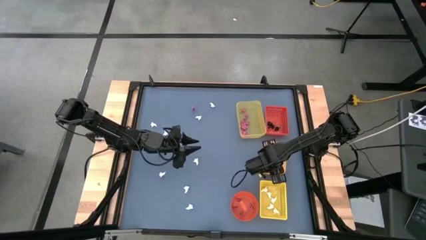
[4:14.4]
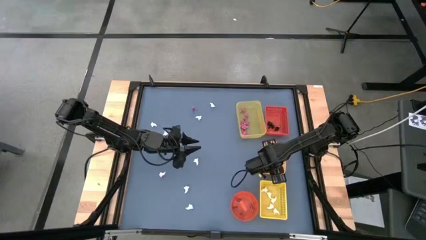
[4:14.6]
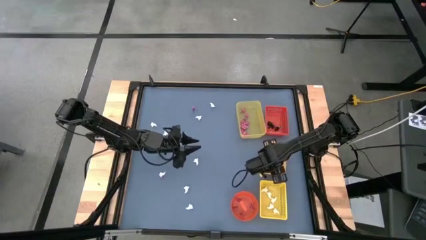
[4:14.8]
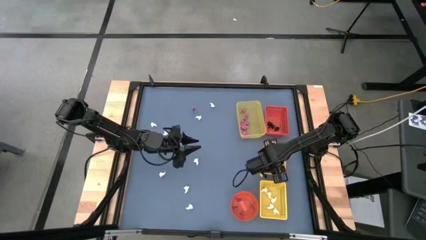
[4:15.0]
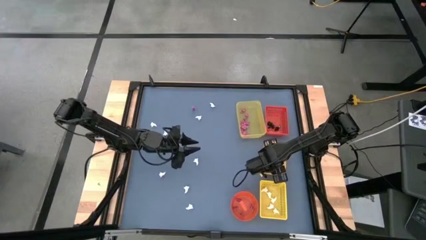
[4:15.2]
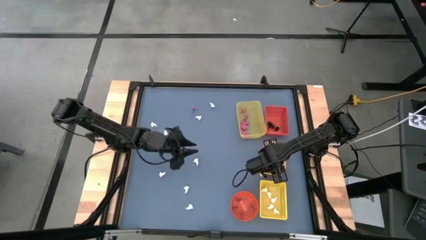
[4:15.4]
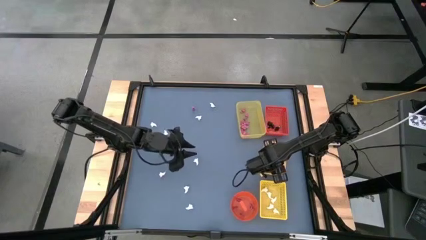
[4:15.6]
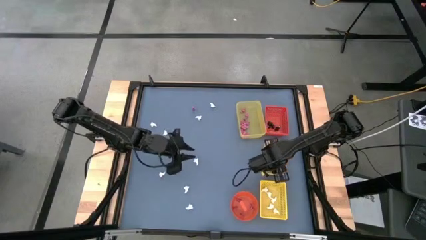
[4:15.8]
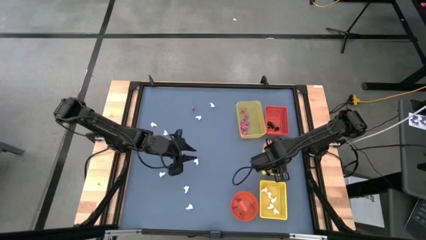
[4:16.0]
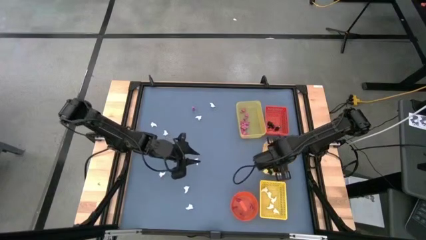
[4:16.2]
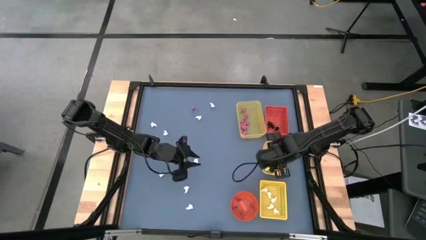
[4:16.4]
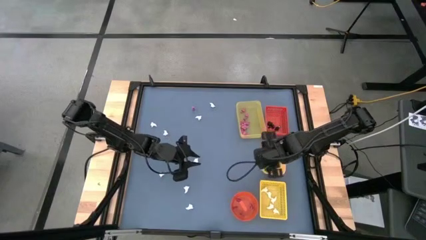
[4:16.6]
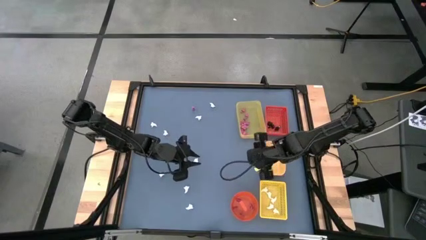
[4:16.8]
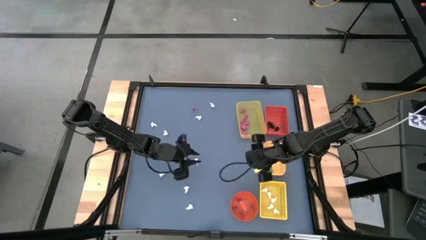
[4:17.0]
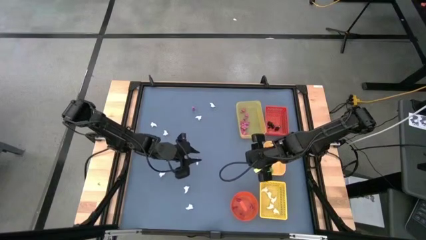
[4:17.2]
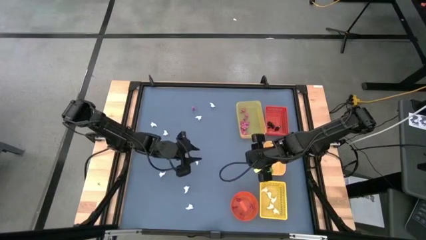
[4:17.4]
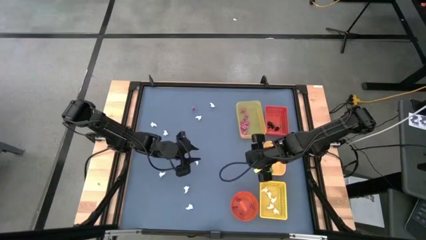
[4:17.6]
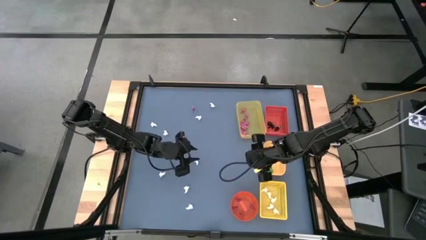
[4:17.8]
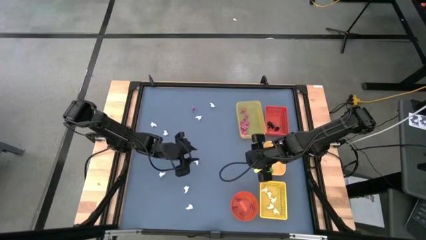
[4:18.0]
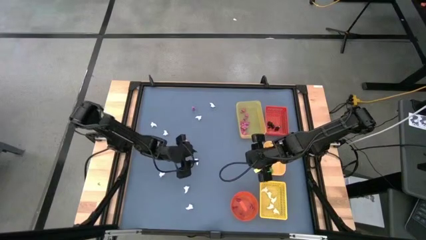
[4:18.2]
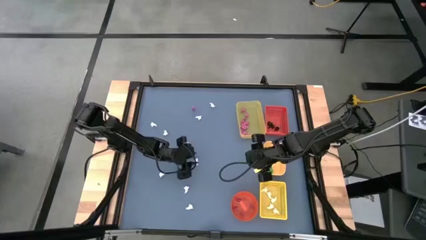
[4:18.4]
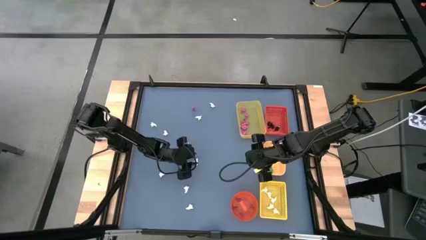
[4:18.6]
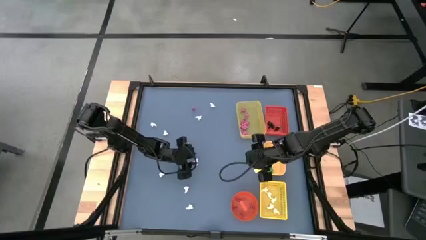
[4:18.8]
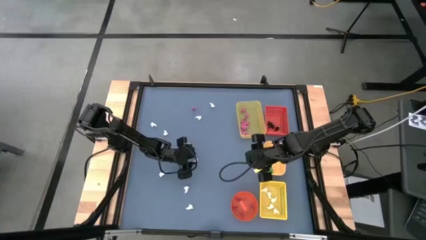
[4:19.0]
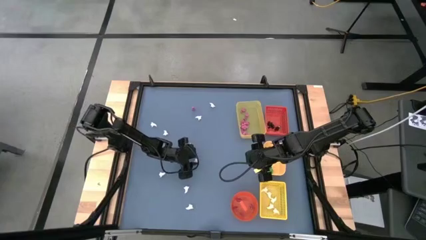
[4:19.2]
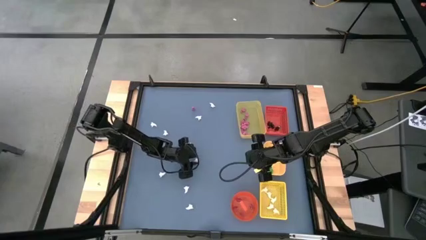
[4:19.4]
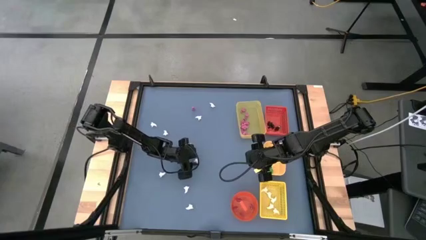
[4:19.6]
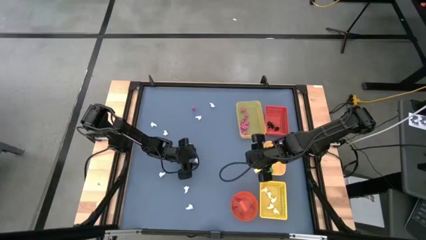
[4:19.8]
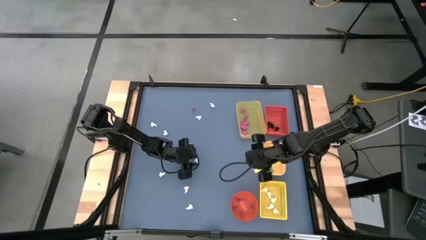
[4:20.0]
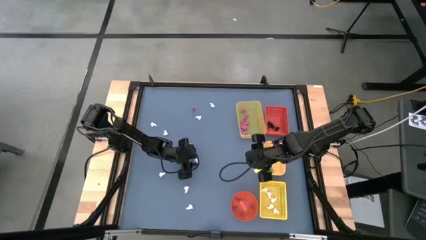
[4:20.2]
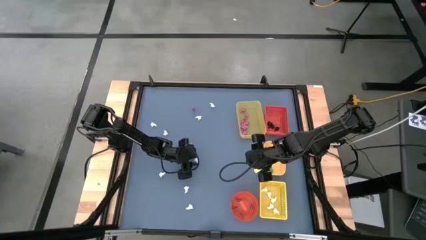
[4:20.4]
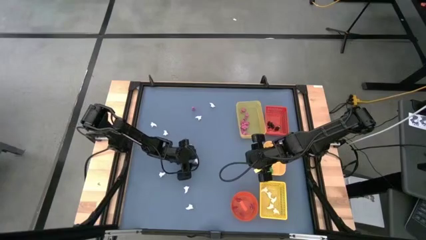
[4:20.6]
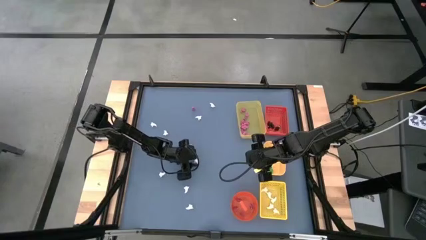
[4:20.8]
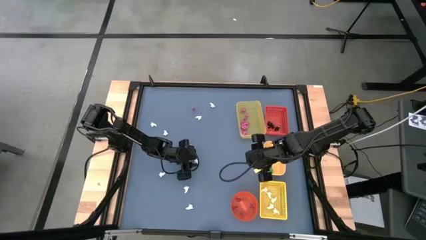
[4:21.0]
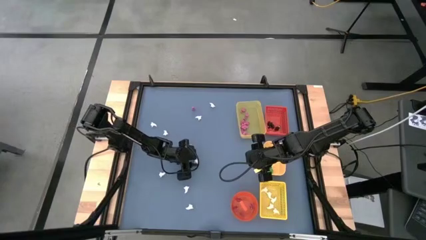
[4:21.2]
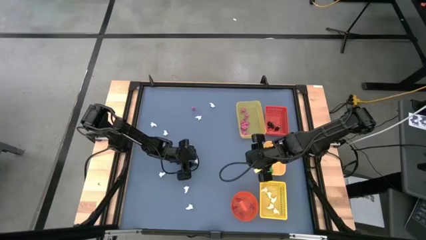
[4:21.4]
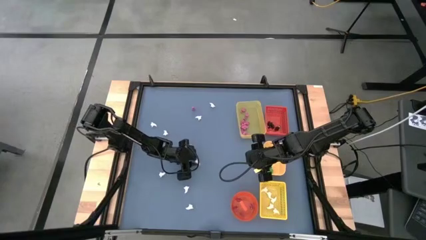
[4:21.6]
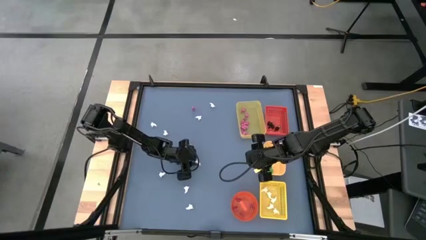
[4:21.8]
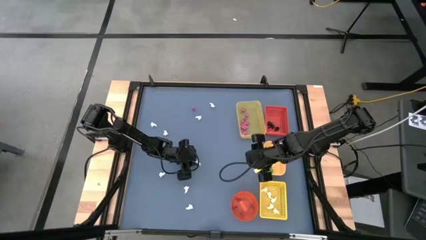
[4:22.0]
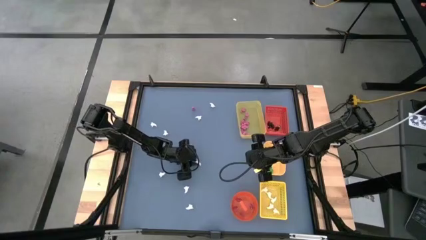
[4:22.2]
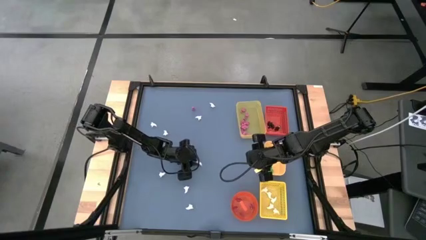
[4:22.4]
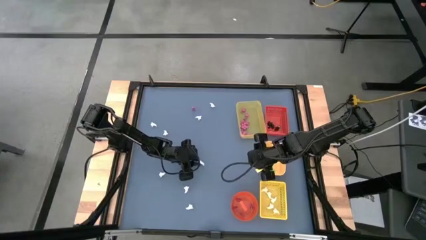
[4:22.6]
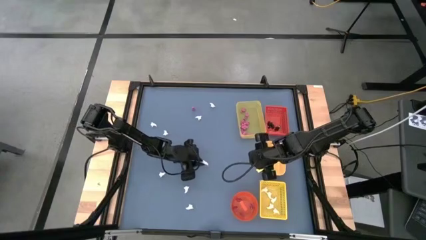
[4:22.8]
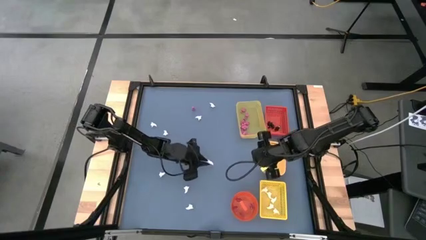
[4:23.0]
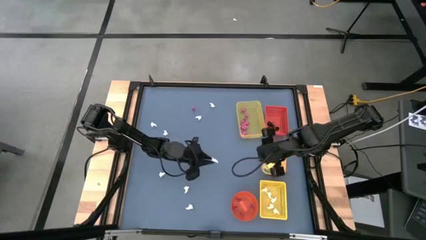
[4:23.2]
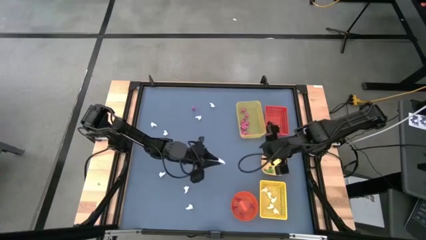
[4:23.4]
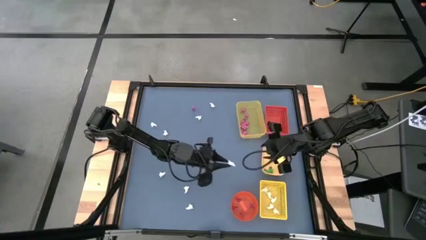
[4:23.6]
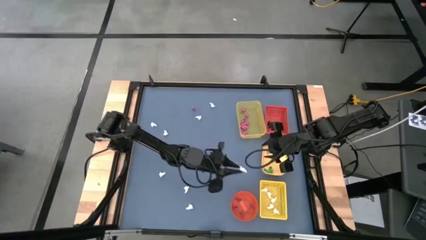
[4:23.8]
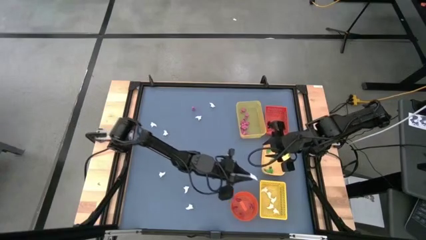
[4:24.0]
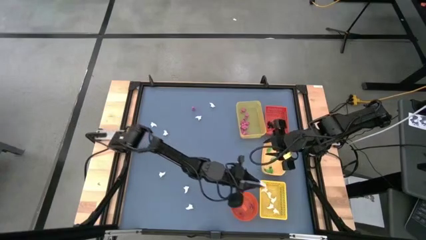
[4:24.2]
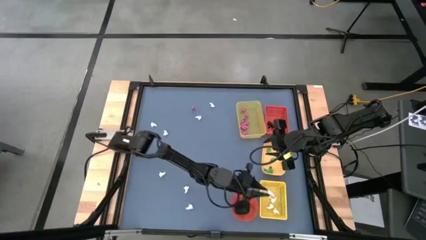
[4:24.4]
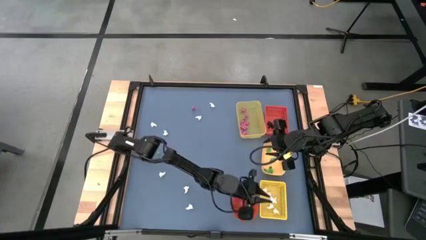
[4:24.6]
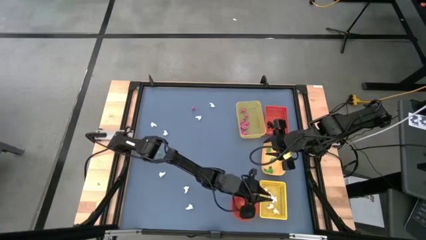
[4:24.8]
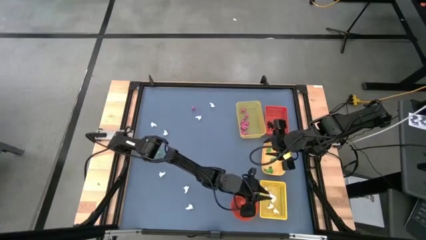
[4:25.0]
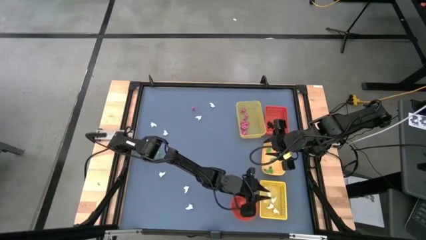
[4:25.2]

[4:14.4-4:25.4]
Task: Sort Halloween decoration
Put the white ghost toy into the yellow box
